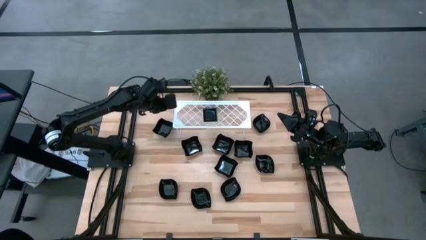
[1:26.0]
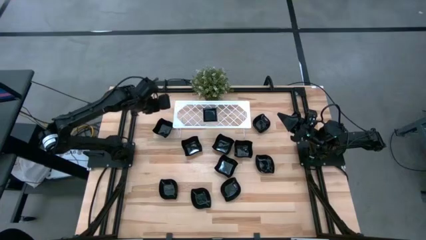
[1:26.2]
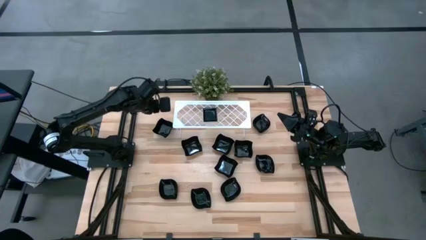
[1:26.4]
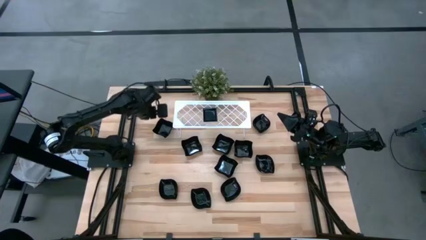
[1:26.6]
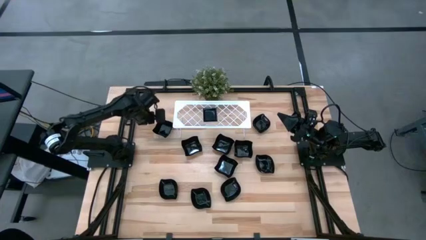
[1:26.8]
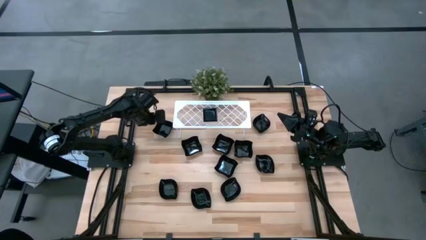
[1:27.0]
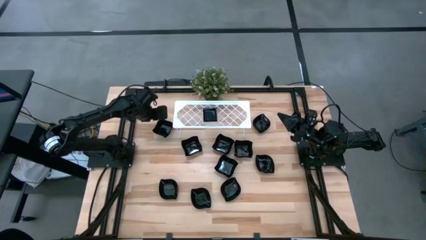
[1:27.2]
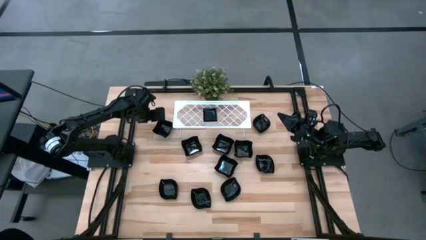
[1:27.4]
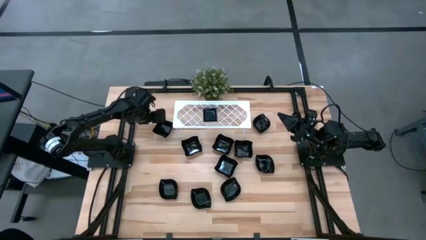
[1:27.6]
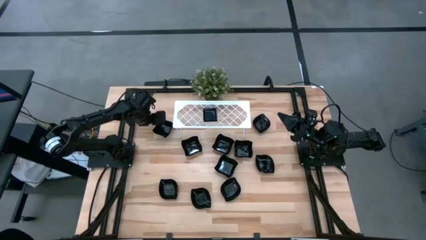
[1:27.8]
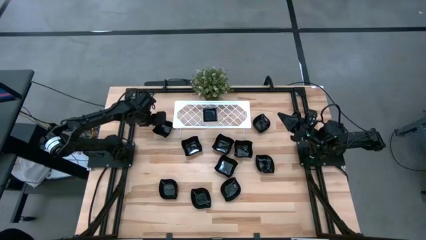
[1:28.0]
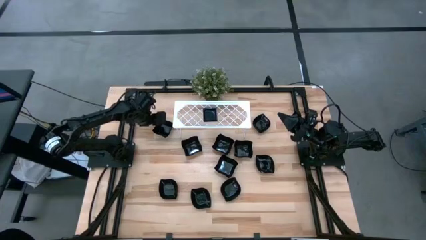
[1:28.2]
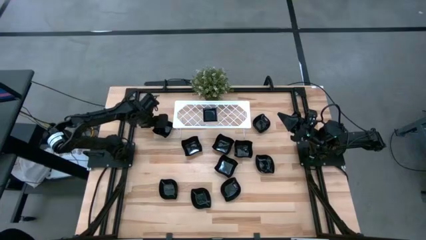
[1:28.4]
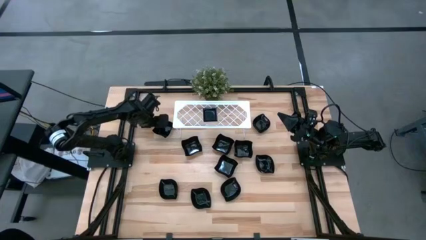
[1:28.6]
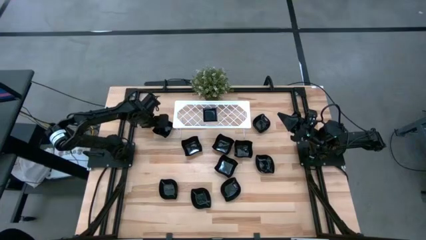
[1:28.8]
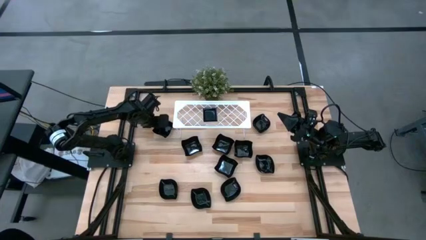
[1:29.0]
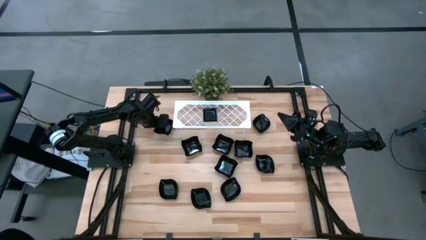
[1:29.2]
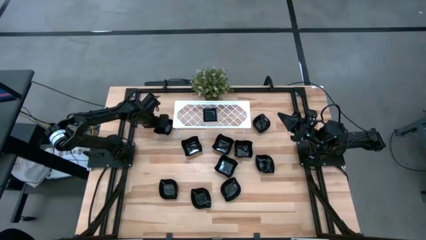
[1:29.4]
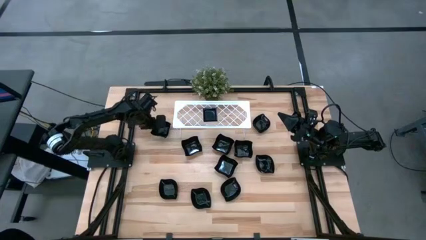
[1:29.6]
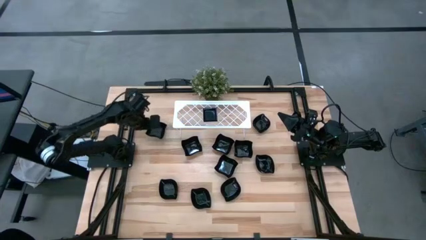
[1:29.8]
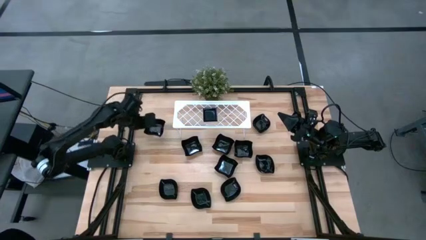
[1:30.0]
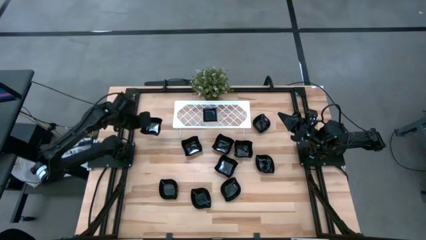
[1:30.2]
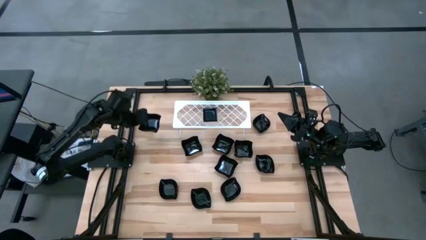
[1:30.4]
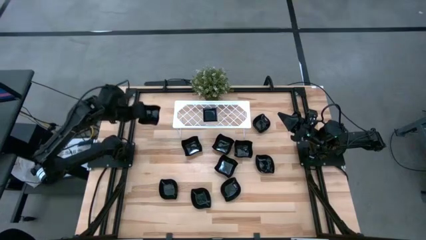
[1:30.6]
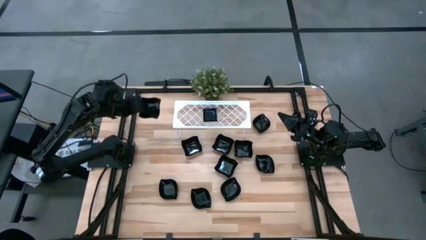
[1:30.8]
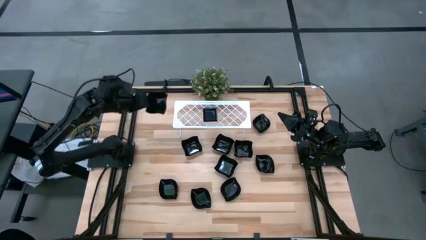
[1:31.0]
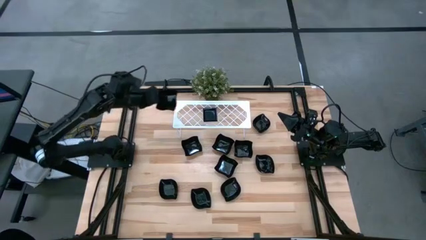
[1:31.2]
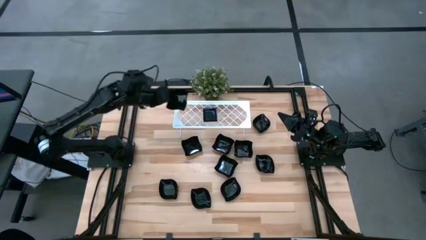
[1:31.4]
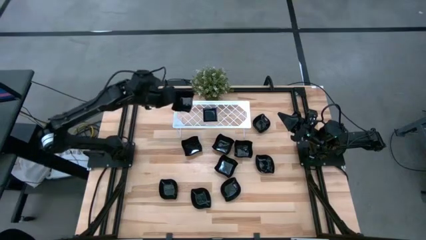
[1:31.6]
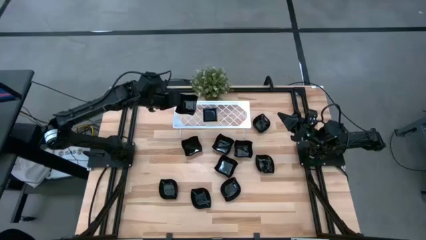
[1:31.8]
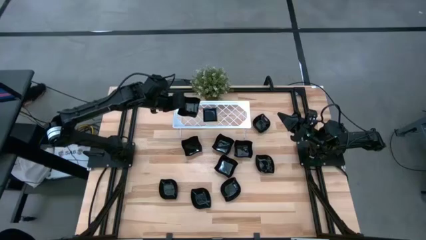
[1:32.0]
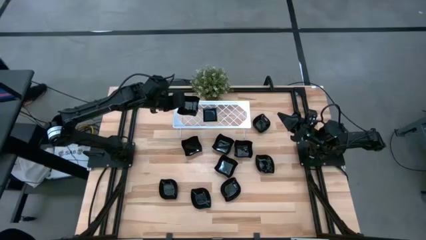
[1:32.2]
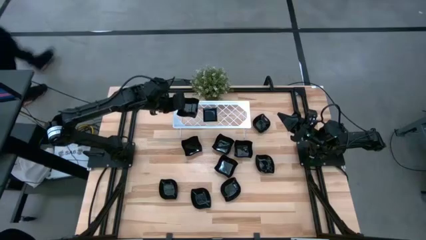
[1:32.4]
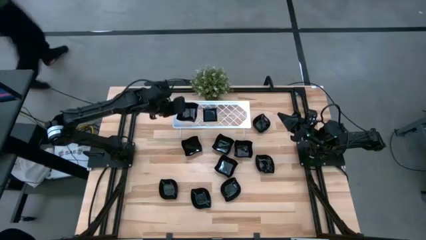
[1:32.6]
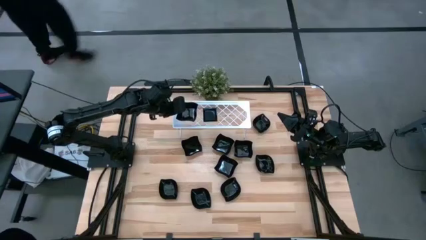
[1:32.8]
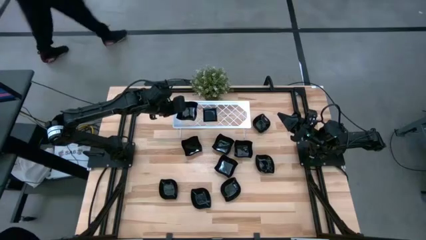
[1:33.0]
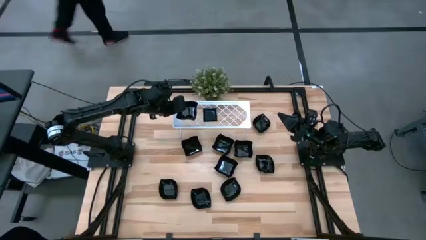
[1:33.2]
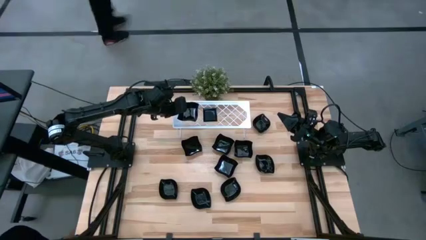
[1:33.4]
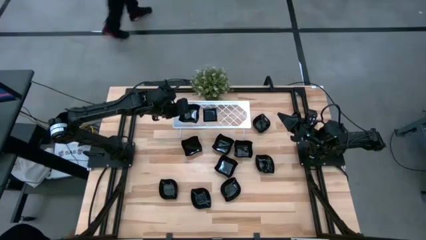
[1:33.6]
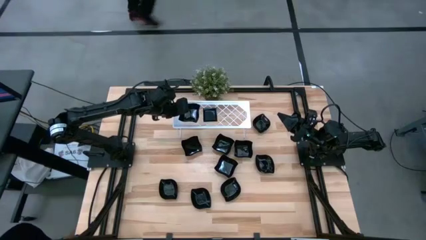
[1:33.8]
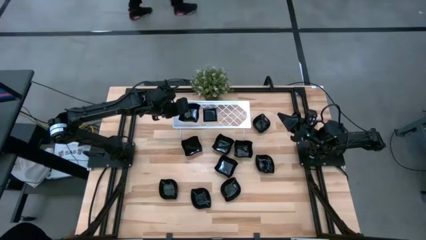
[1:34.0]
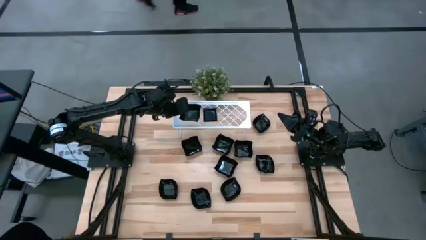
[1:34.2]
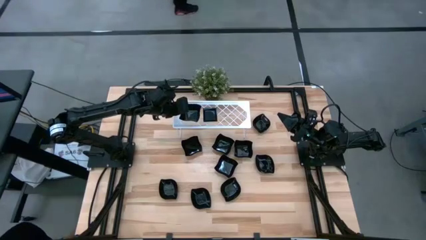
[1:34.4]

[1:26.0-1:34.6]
Task: Pick & Place Mini shaped plates
Put the distorted square plate on the shelf

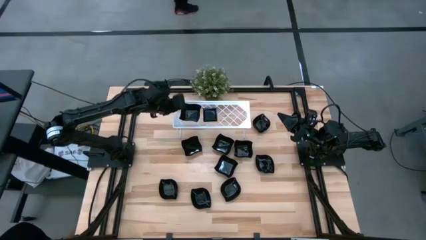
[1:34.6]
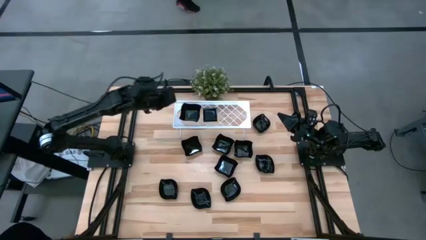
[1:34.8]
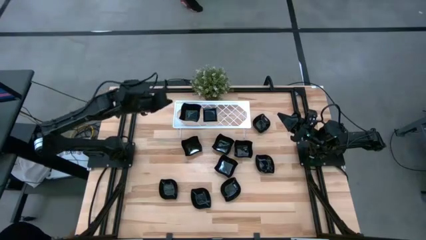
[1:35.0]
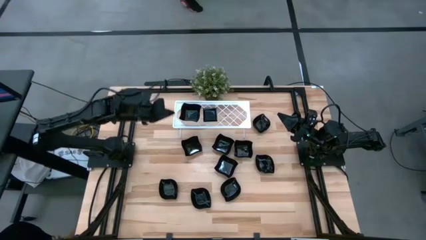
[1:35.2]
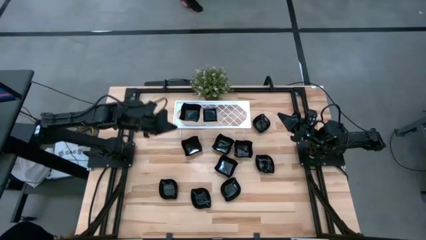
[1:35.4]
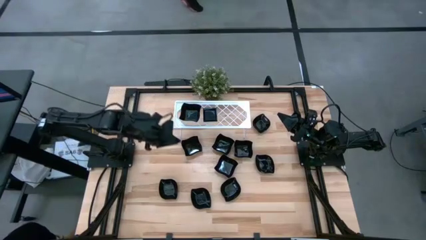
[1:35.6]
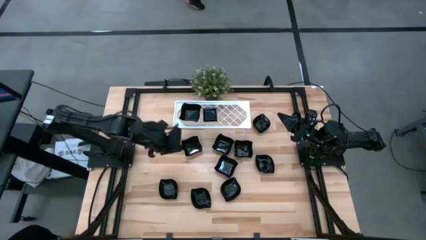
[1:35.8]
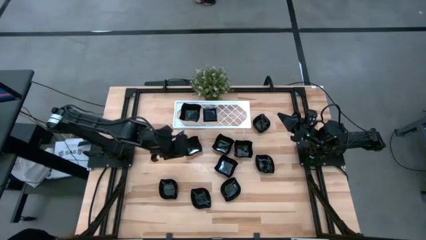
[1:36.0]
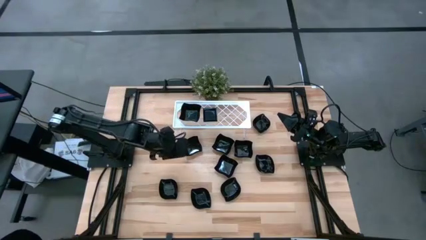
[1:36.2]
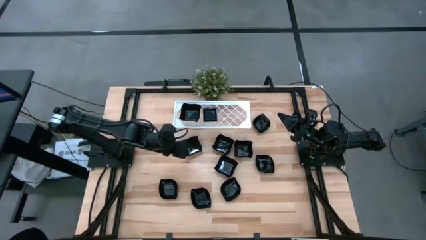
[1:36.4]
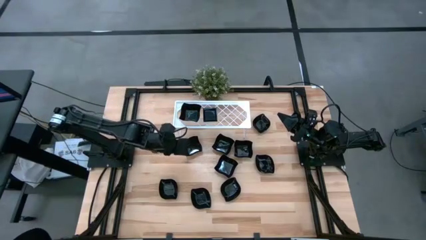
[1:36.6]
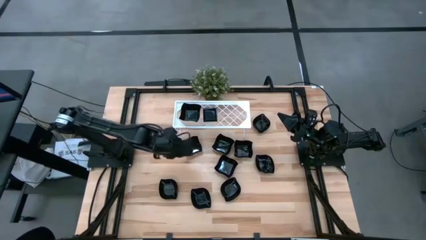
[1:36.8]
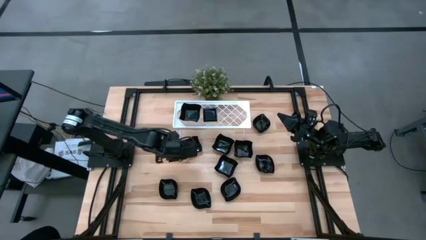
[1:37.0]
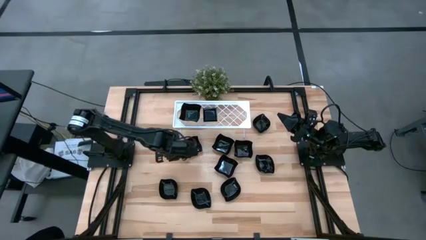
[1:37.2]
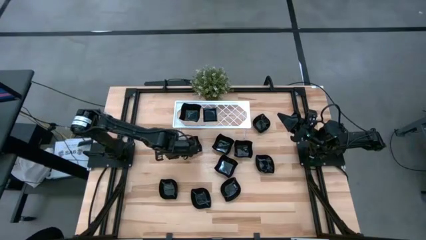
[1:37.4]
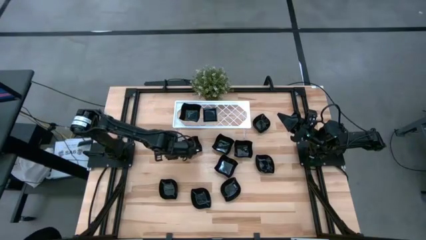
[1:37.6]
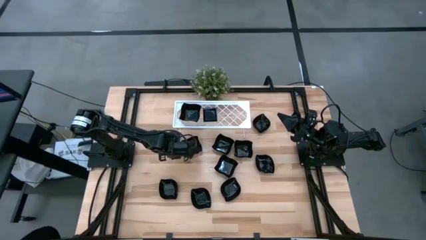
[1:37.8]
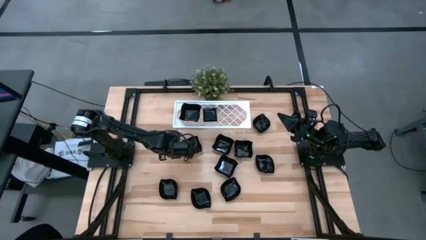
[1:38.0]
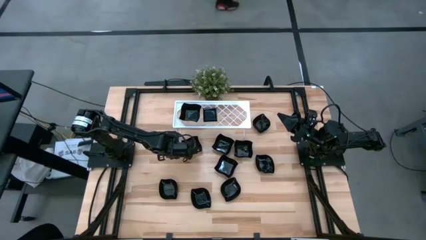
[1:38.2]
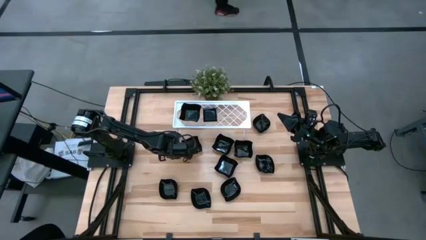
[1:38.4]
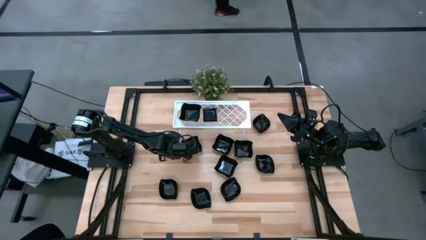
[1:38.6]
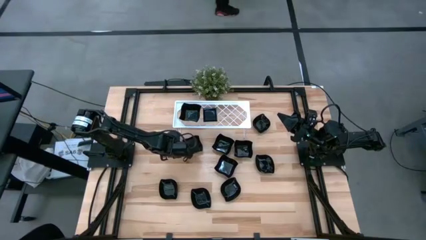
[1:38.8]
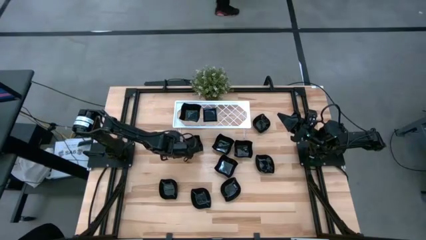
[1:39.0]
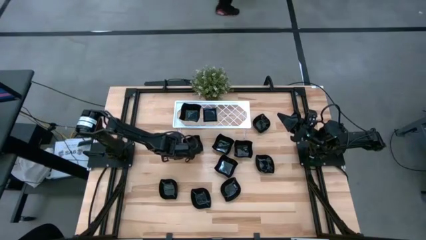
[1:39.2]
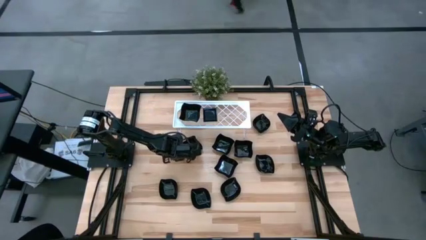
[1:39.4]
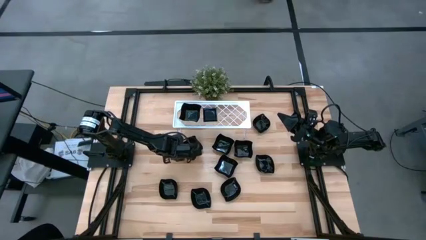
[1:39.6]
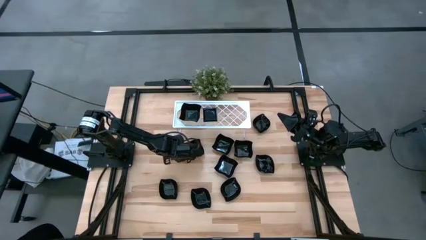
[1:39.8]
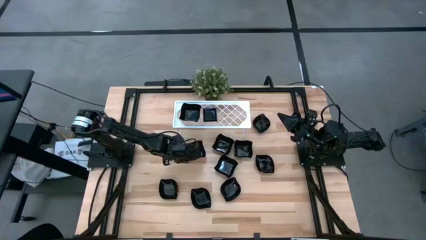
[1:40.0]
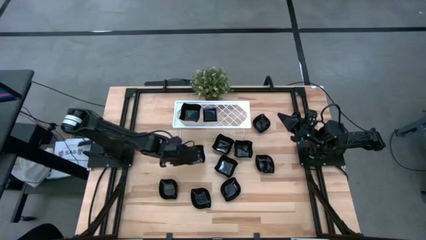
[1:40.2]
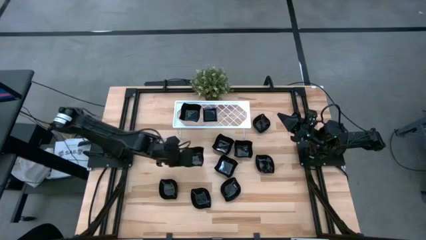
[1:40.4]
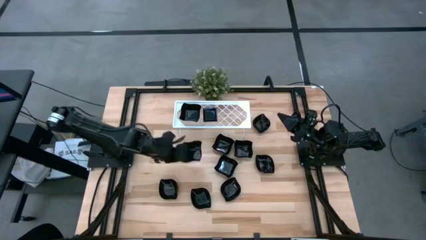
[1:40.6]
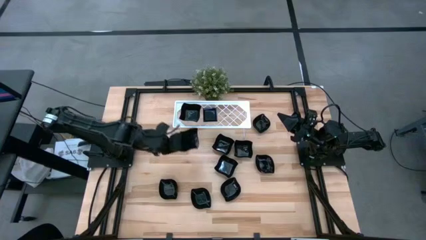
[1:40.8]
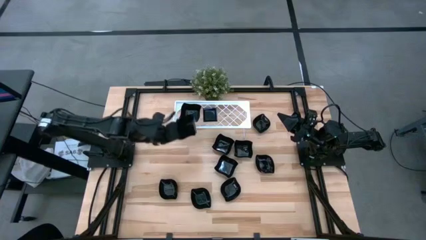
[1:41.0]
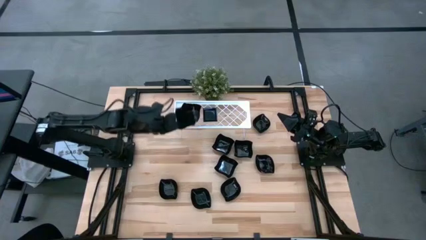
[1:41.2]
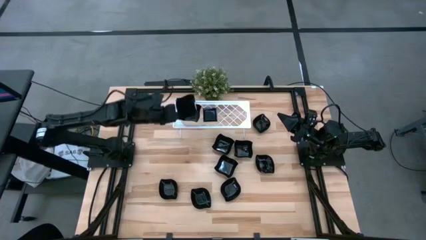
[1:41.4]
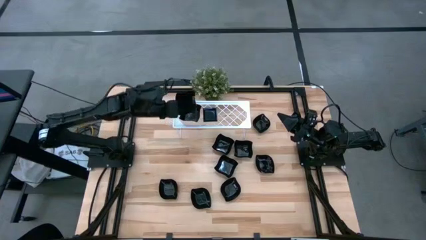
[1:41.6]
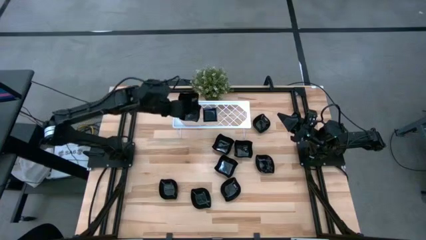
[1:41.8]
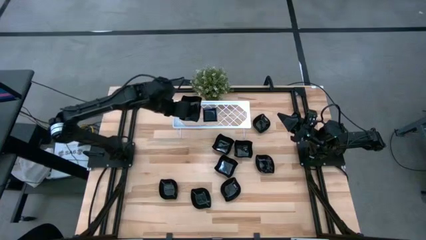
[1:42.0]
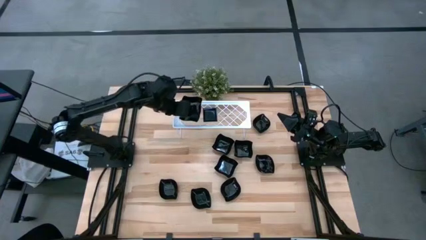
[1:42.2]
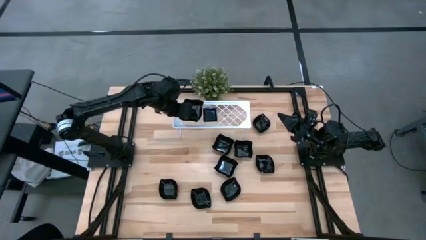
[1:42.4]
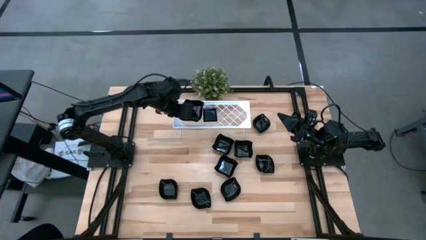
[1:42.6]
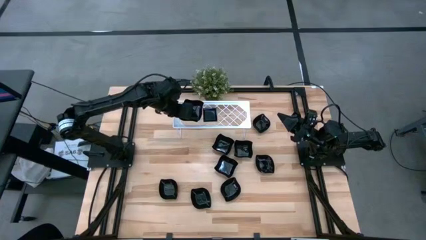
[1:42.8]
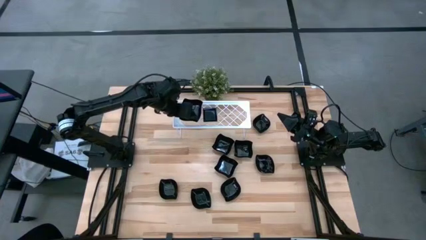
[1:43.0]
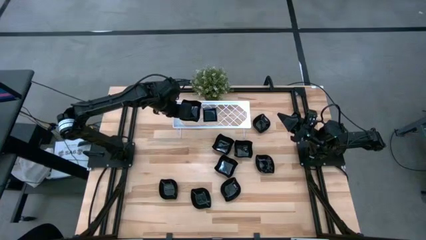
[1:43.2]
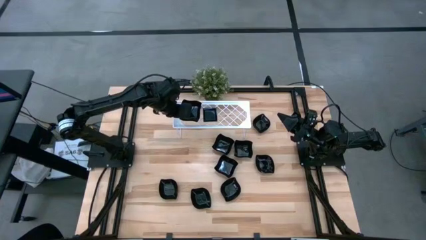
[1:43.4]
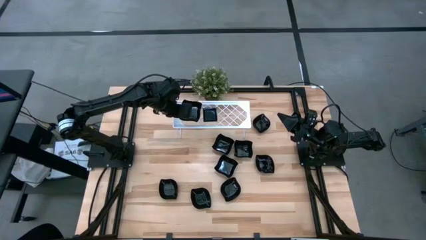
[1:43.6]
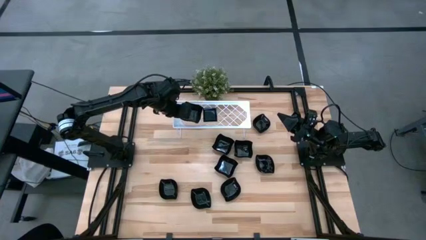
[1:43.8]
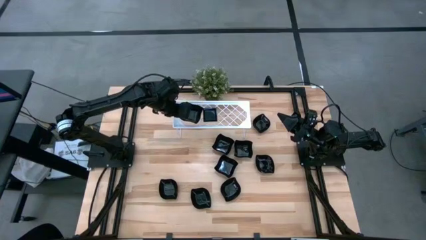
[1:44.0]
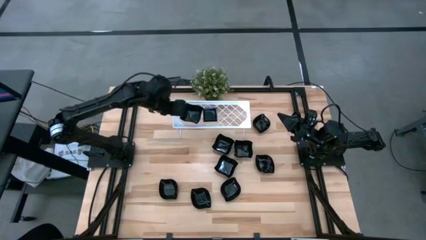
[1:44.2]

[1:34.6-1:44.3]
Stack the distorted square plate on top of the distorted square plate on the shelf
